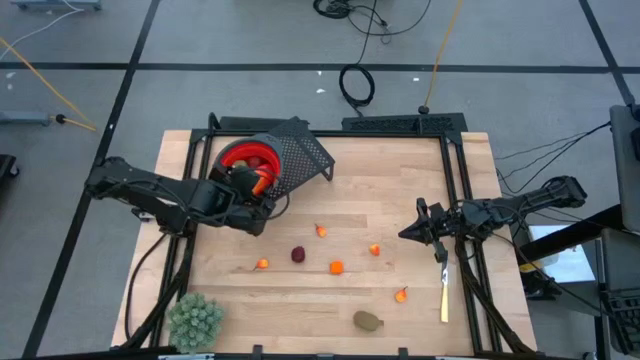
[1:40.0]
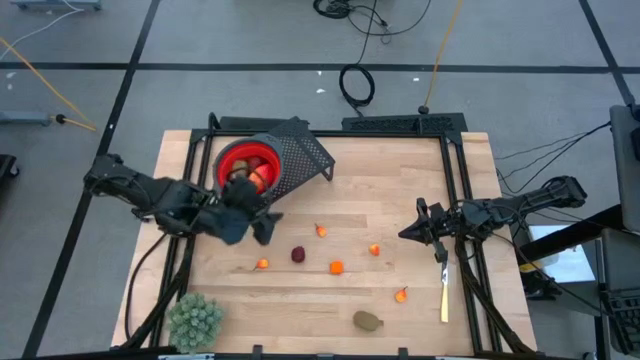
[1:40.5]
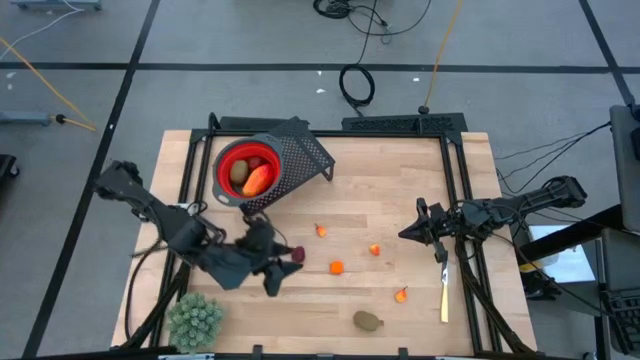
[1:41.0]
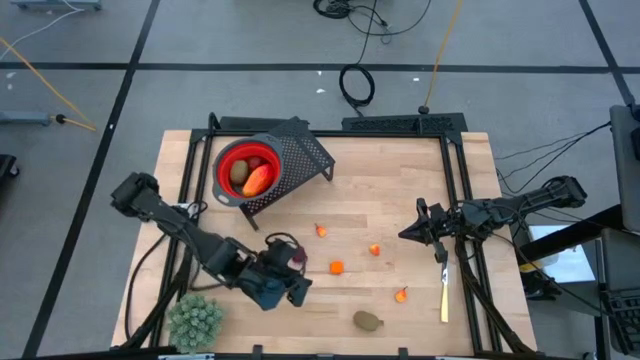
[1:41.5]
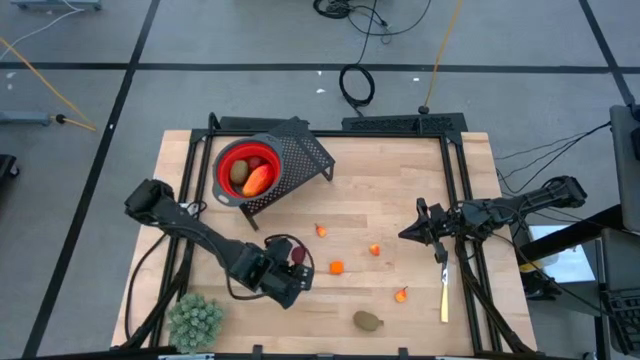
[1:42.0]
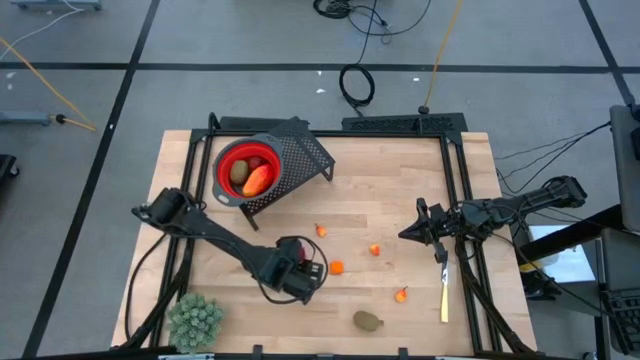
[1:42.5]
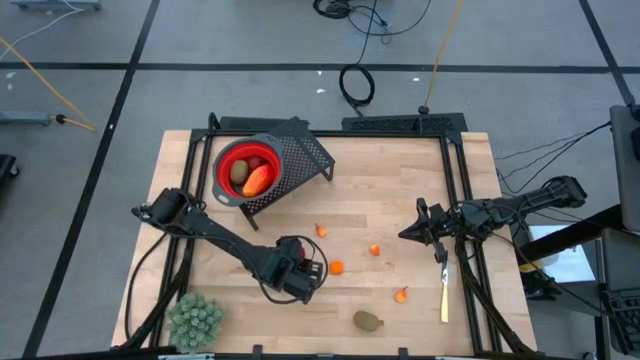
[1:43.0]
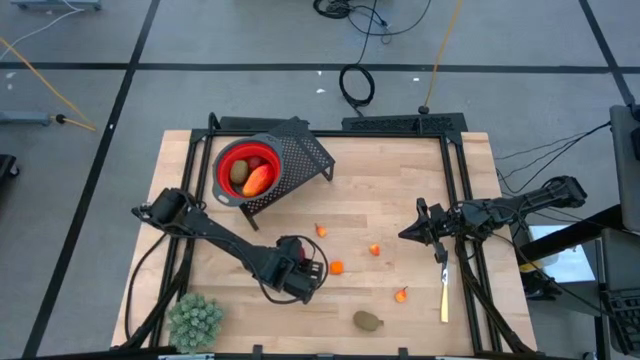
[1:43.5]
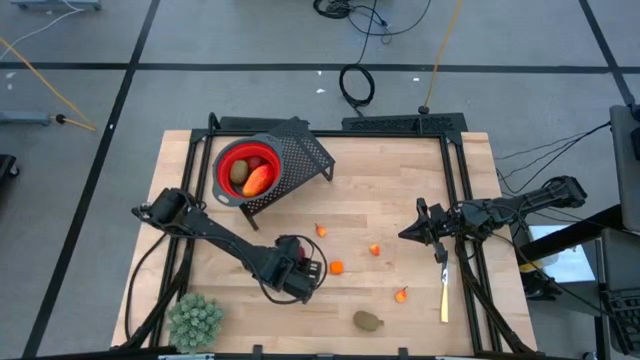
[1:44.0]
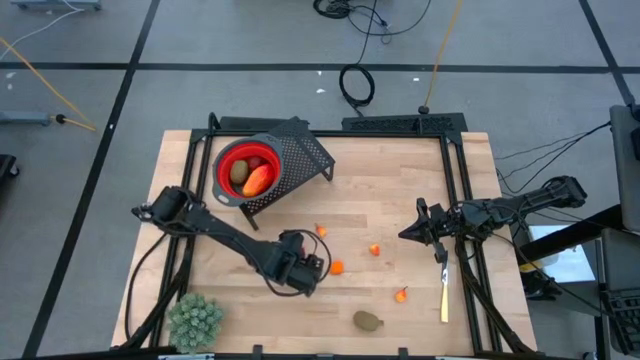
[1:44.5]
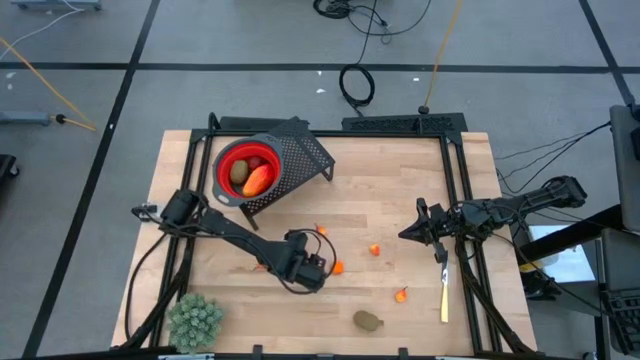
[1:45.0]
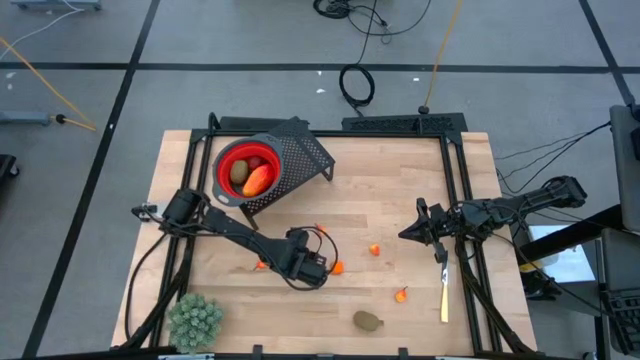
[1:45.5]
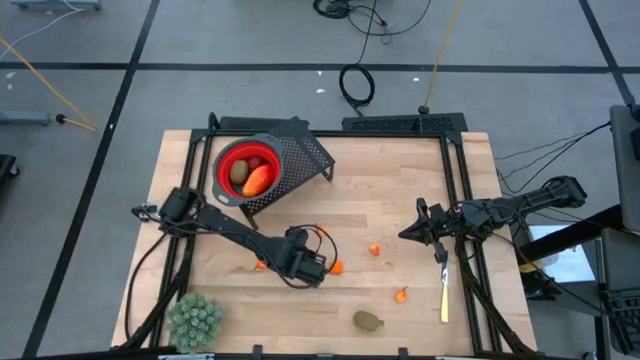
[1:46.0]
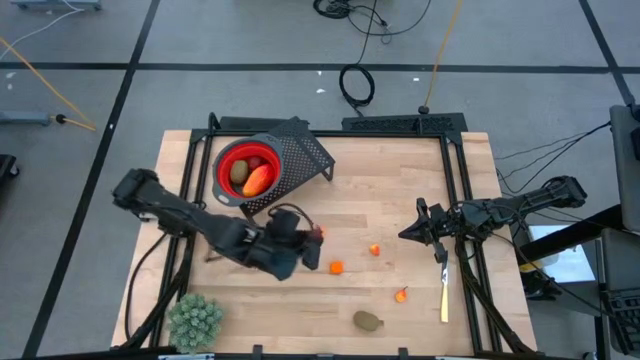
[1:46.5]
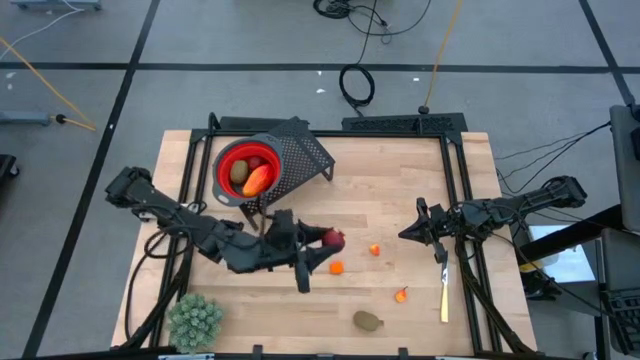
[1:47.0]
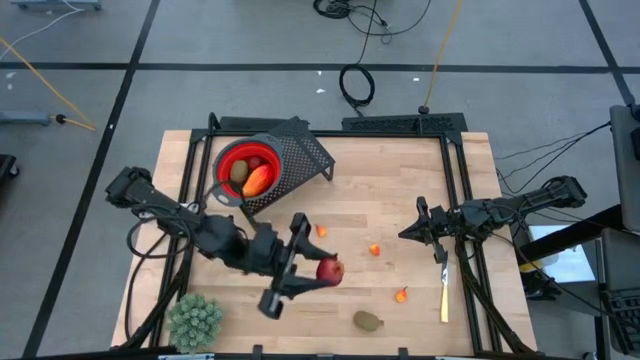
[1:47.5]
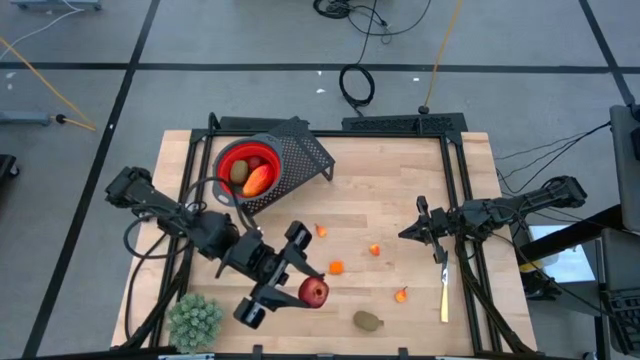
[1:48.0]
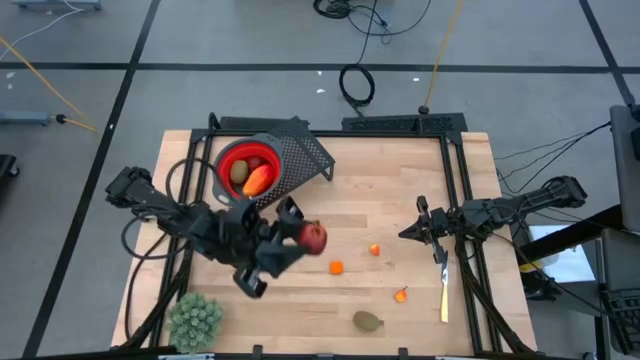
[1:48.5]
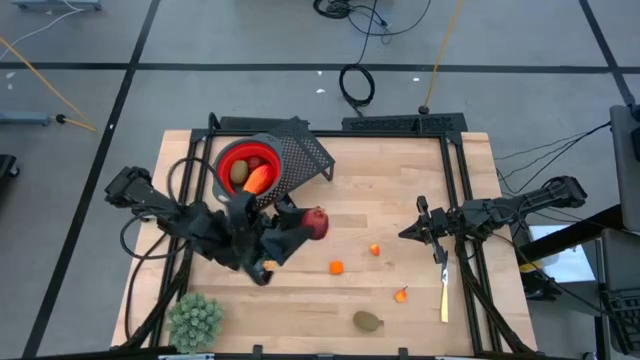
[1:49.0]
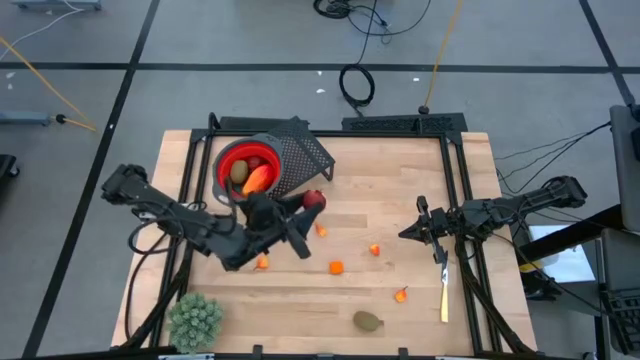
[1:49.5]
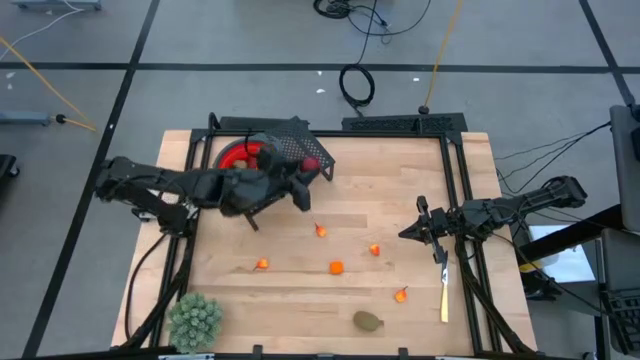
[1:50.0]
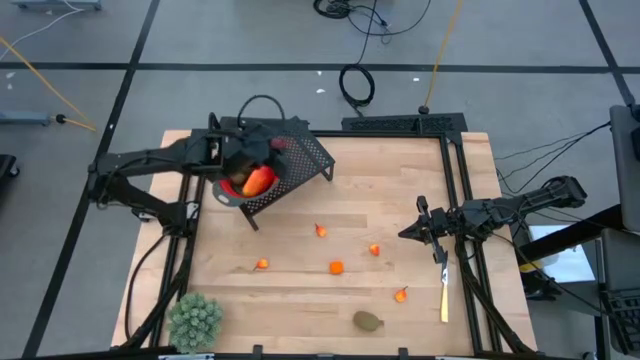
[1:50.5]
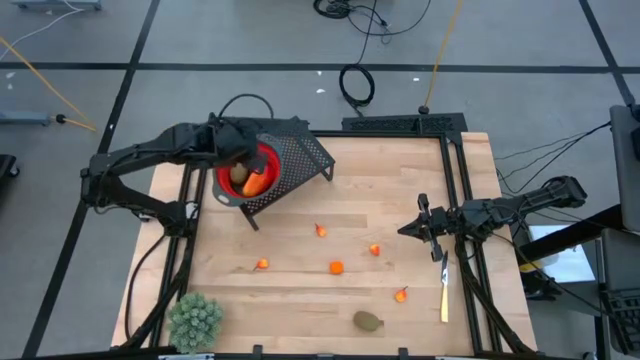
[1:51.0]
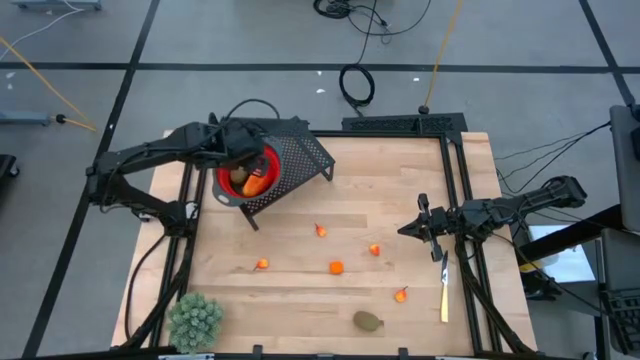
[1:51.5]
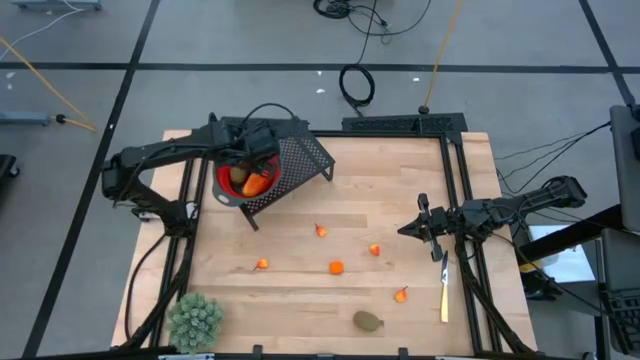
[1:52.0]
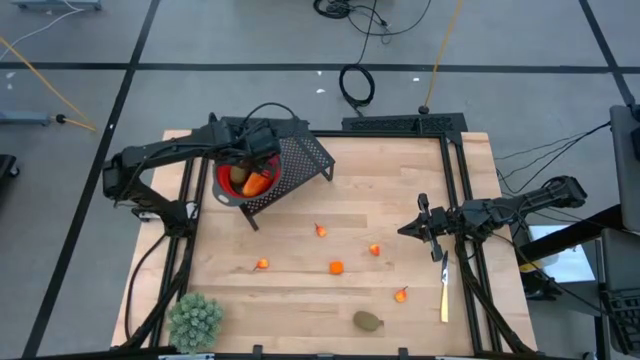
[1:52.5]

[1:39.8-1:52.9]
Task: Pick & Place Fruit
Put the pomegranate into the red strainer bowl on the shelf

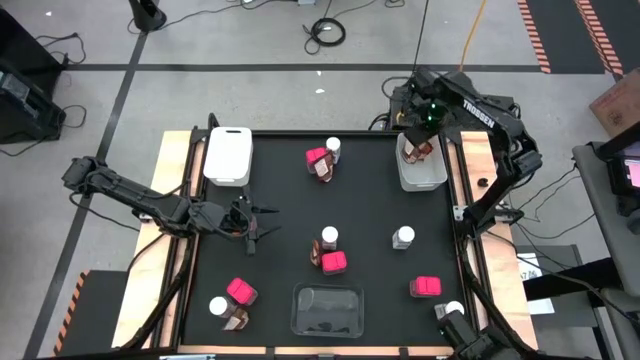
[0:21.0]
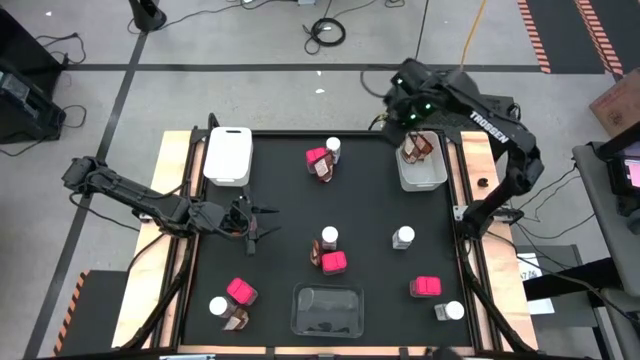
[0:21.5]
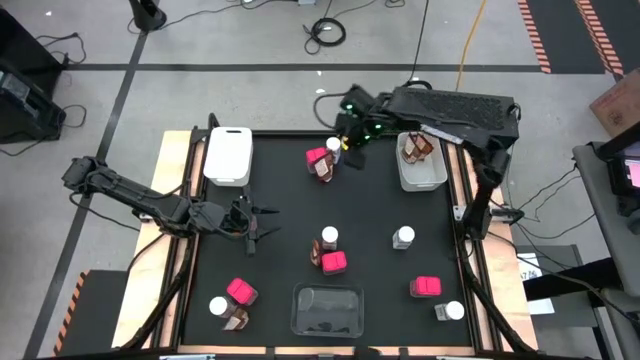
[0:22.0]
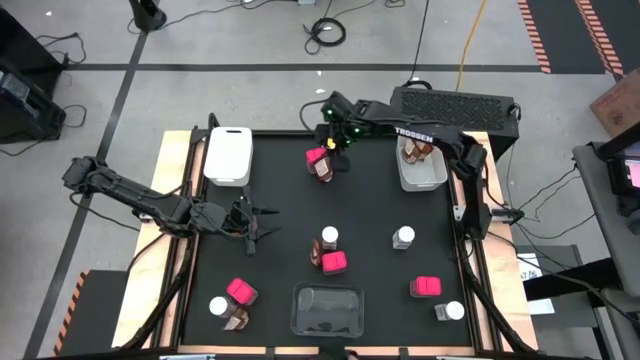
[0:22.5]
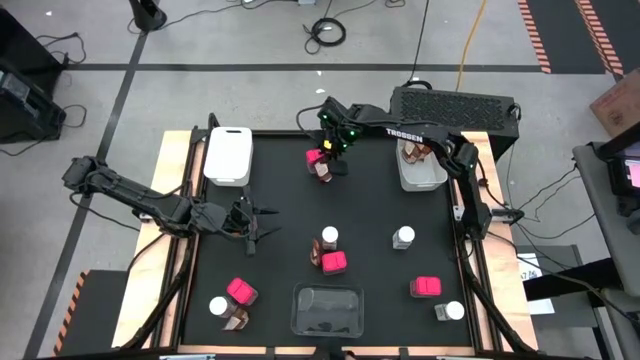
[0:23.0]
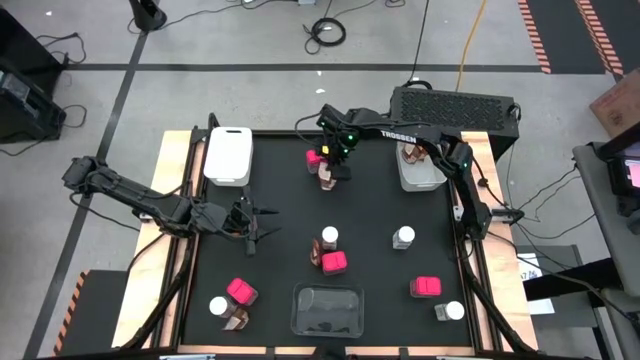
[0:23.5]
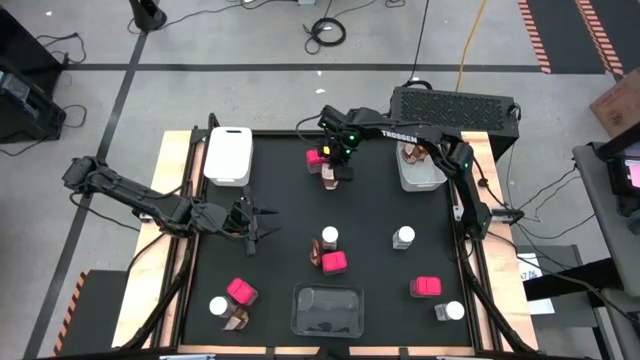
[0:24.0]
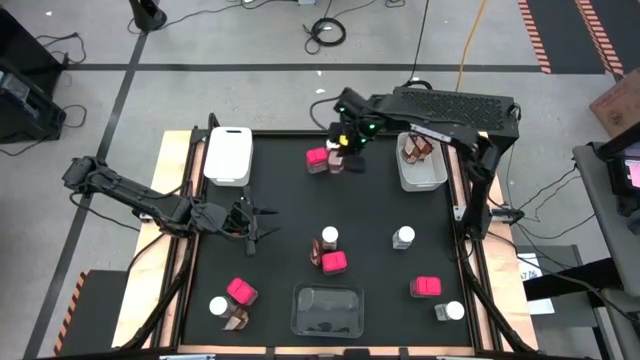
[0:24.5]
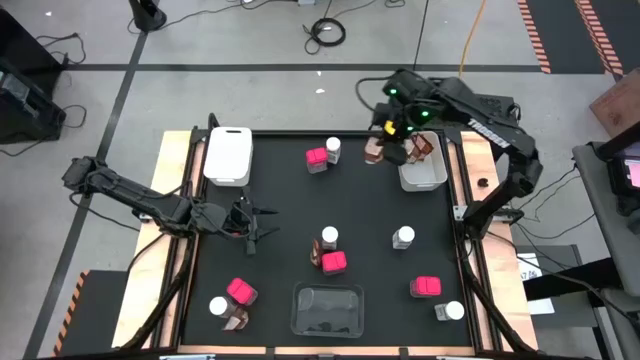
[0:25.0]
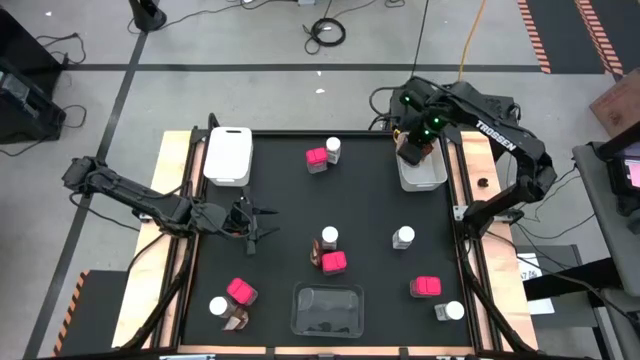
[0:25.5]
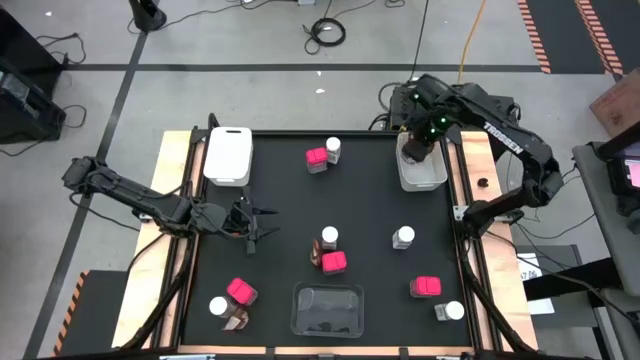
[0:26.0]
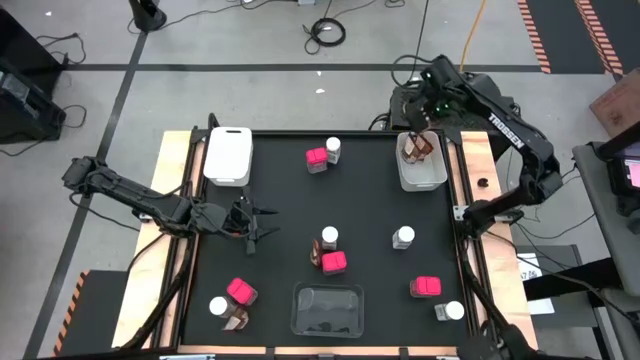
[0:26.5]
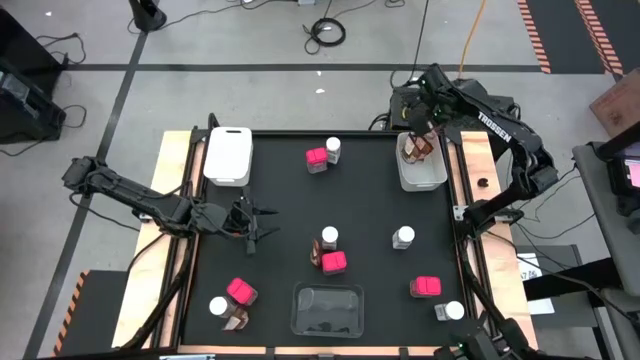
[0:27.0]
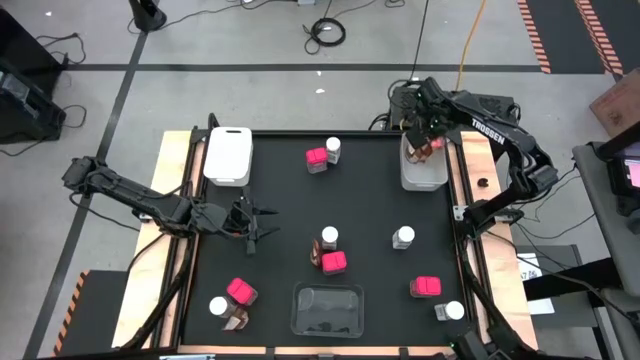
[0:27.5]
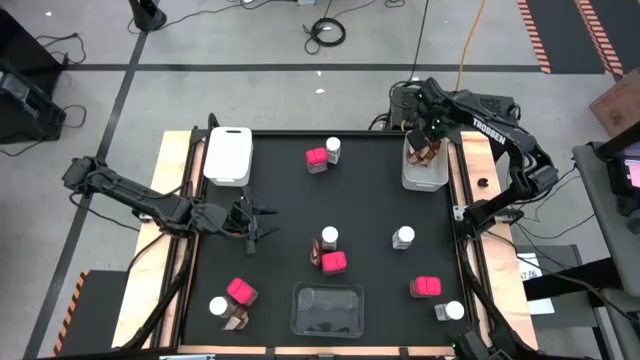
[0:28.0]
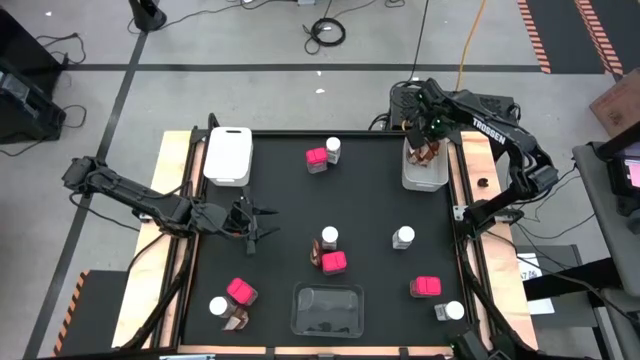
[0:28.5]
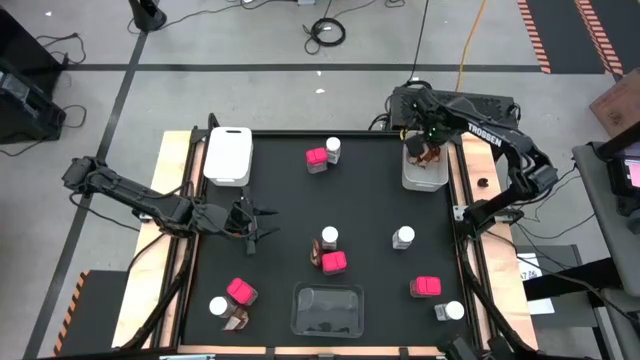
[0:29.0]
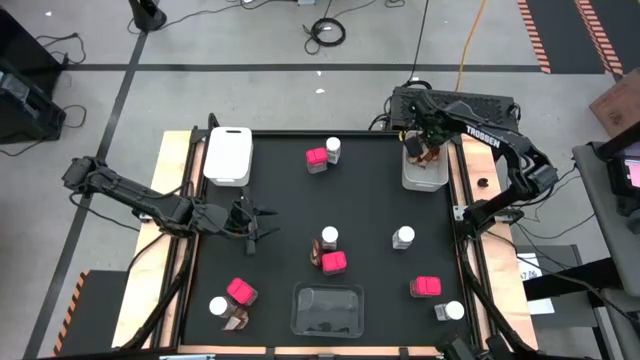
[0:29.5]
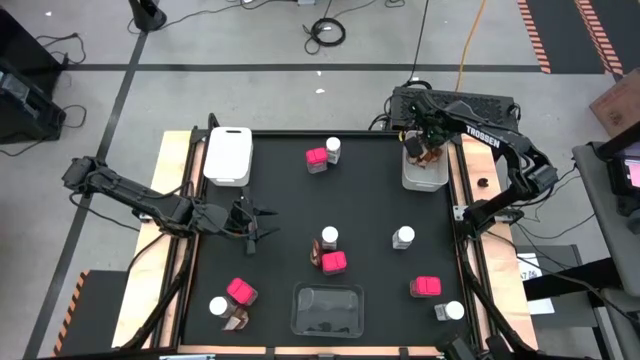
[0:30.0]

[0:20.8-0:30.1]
Task: Sort spices by type
Put the brown seasoning pack into the right white bin
